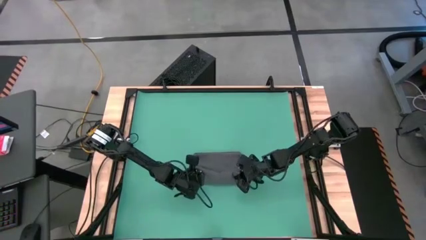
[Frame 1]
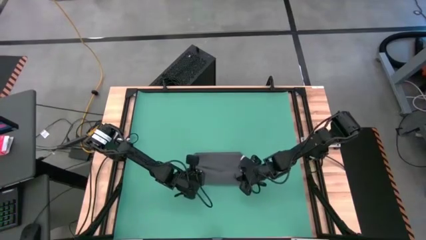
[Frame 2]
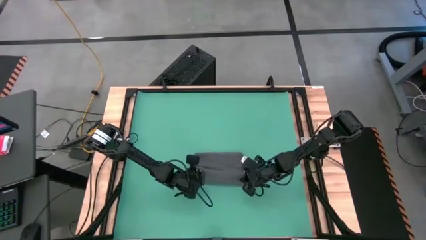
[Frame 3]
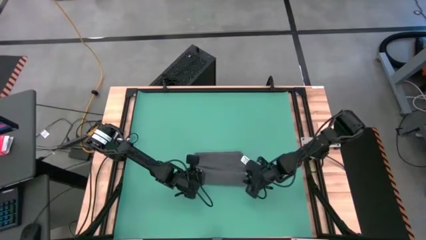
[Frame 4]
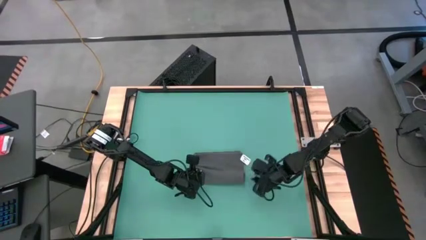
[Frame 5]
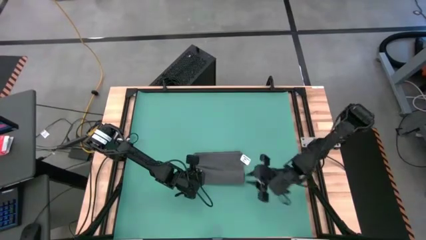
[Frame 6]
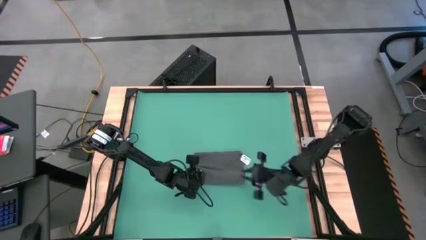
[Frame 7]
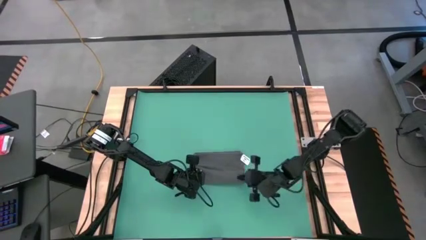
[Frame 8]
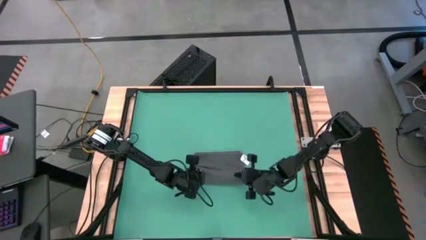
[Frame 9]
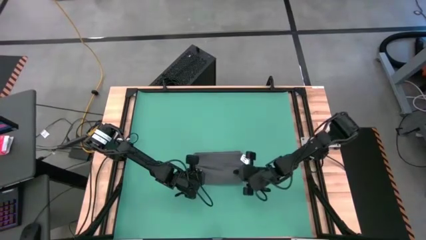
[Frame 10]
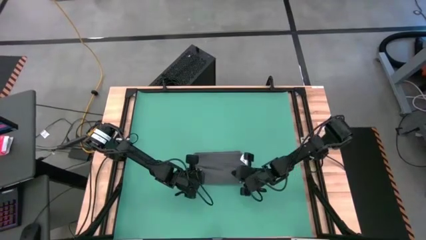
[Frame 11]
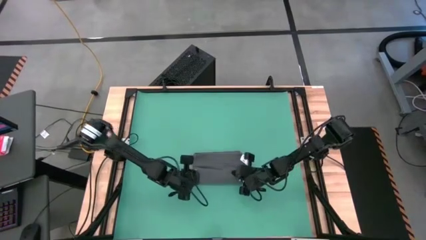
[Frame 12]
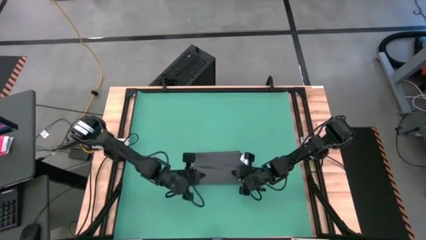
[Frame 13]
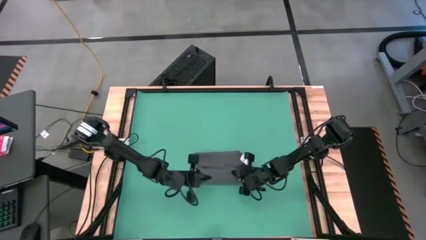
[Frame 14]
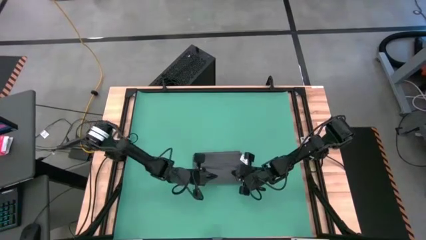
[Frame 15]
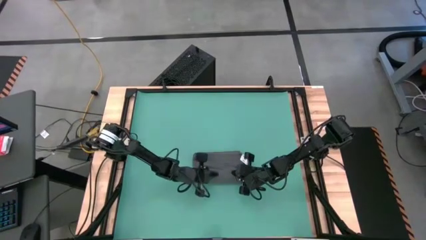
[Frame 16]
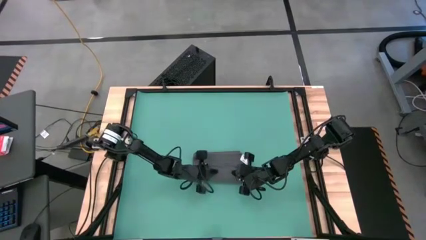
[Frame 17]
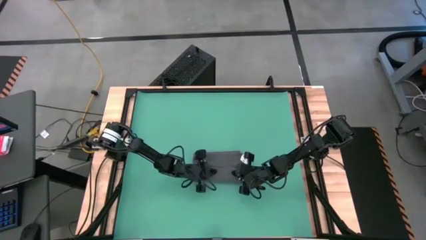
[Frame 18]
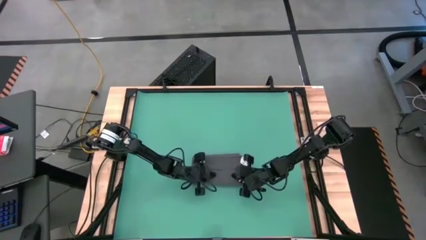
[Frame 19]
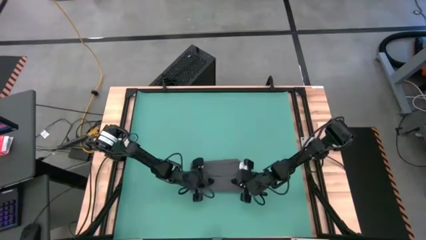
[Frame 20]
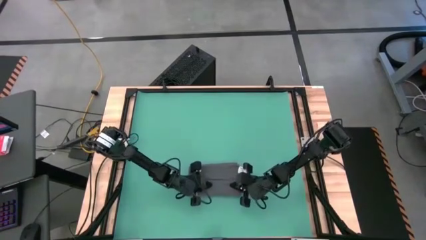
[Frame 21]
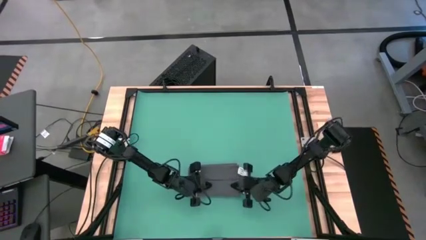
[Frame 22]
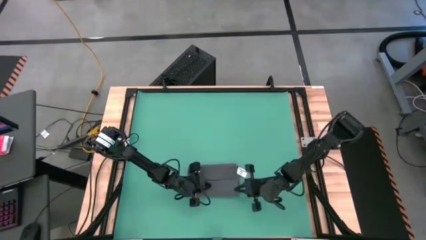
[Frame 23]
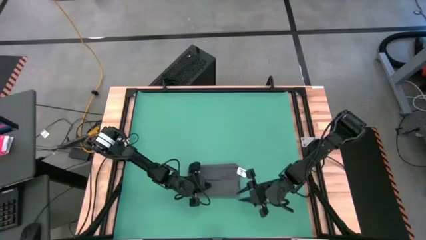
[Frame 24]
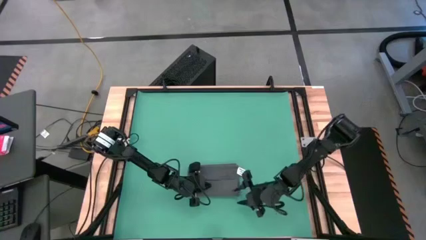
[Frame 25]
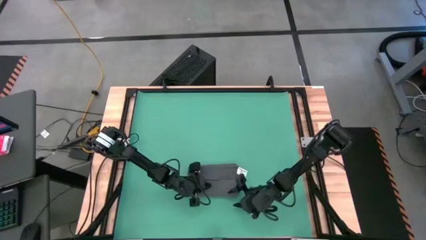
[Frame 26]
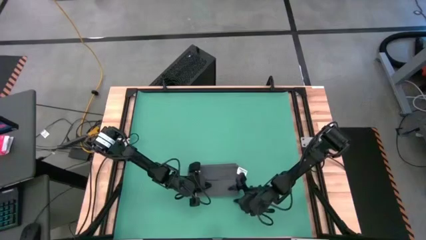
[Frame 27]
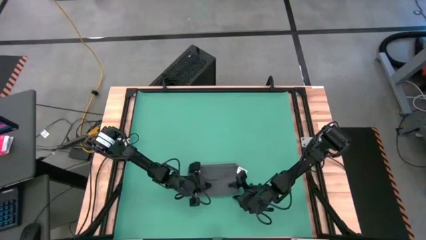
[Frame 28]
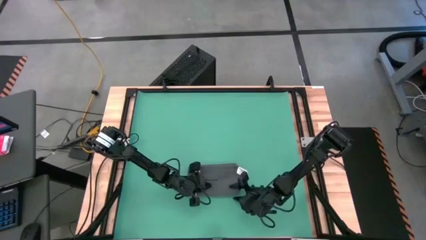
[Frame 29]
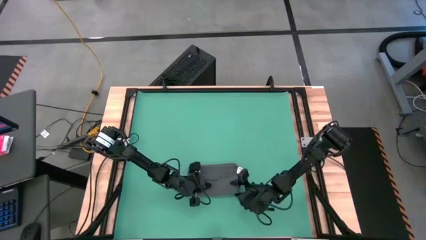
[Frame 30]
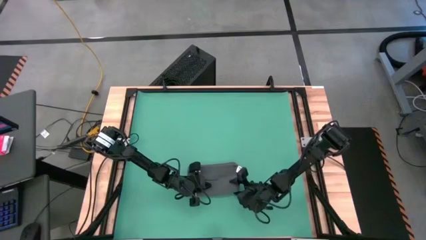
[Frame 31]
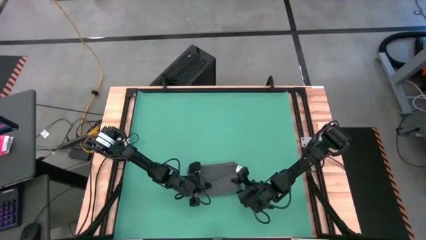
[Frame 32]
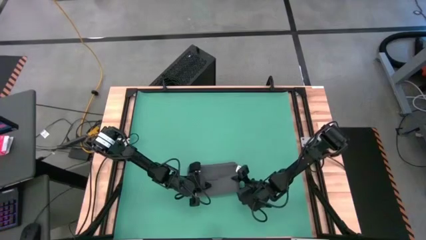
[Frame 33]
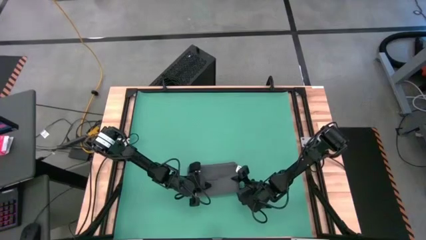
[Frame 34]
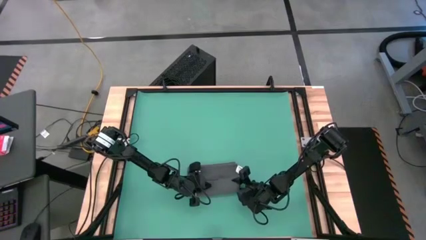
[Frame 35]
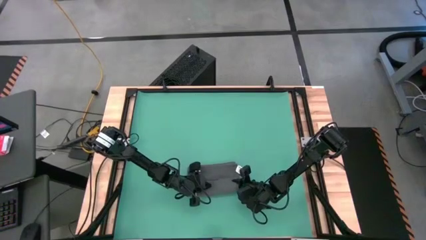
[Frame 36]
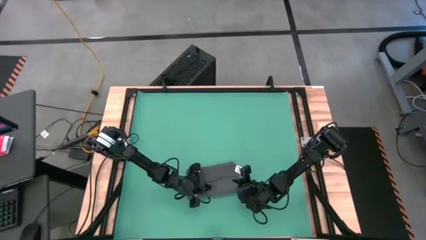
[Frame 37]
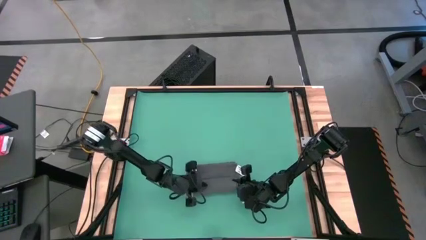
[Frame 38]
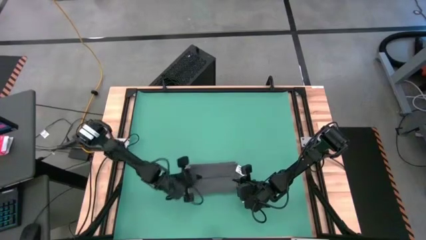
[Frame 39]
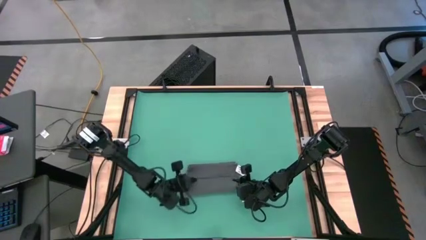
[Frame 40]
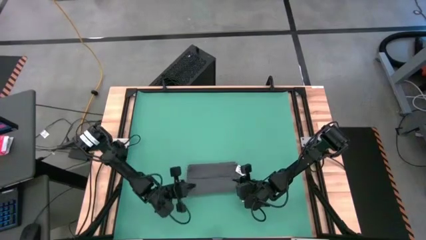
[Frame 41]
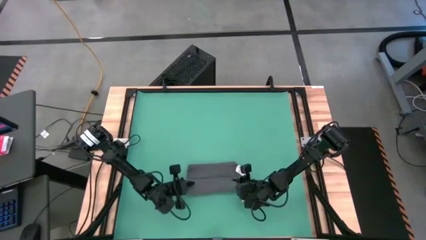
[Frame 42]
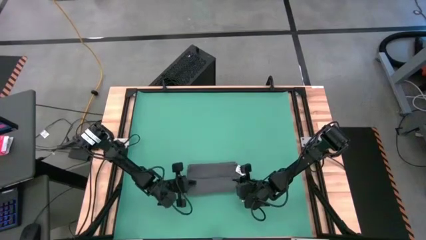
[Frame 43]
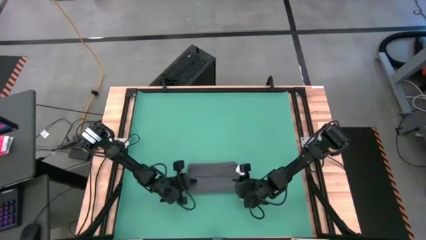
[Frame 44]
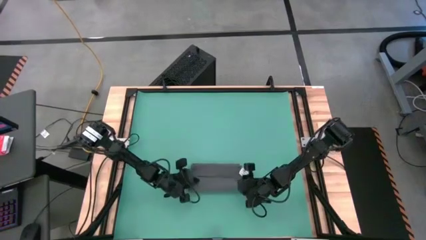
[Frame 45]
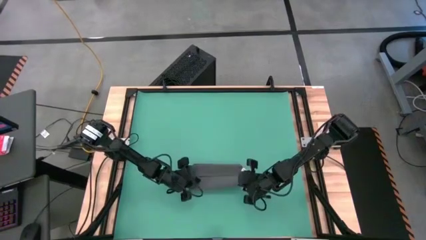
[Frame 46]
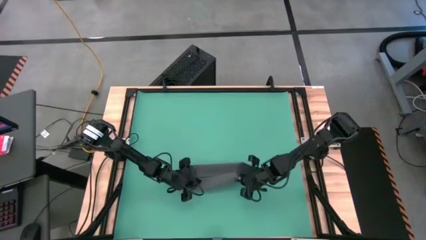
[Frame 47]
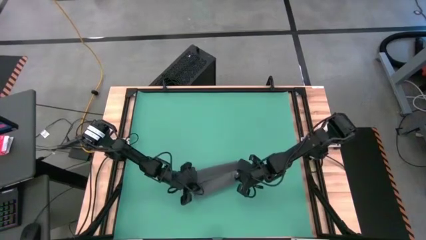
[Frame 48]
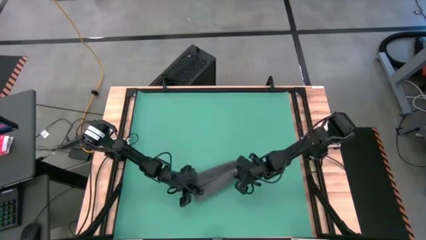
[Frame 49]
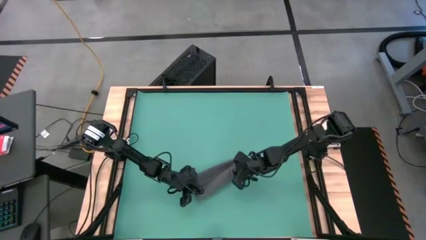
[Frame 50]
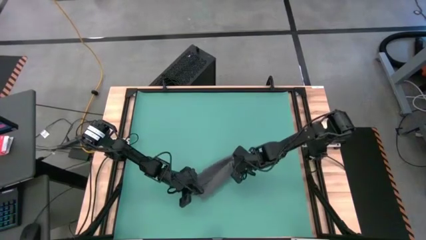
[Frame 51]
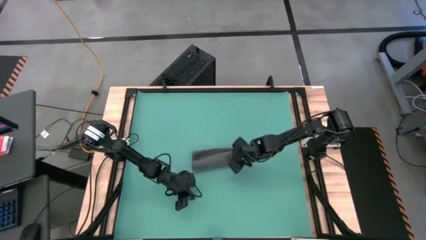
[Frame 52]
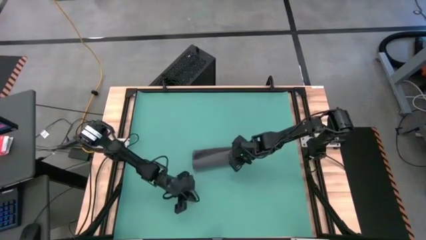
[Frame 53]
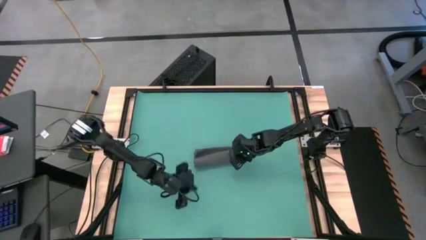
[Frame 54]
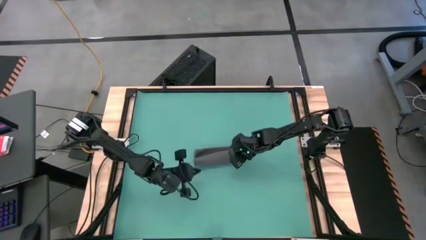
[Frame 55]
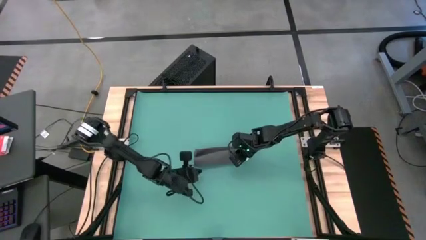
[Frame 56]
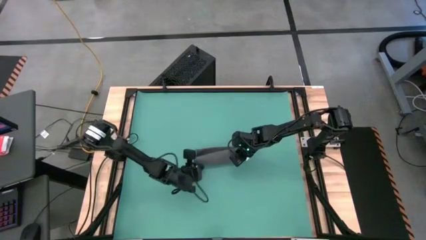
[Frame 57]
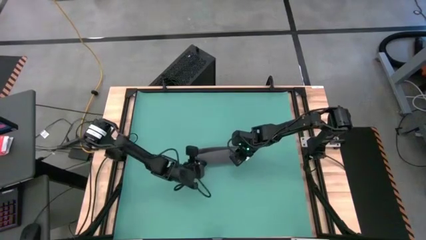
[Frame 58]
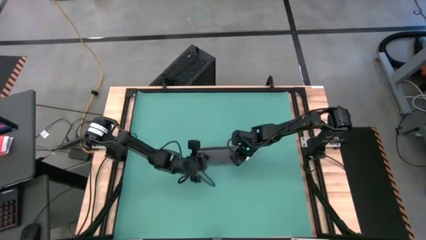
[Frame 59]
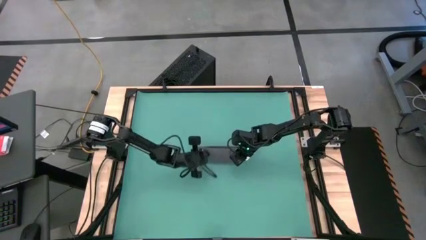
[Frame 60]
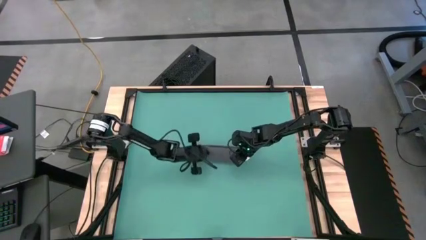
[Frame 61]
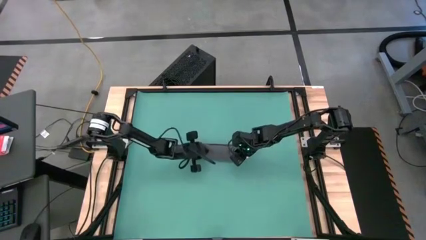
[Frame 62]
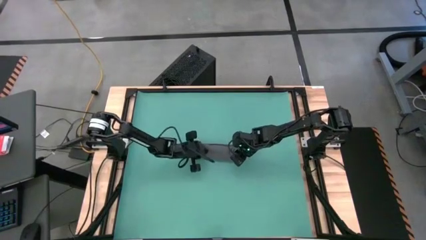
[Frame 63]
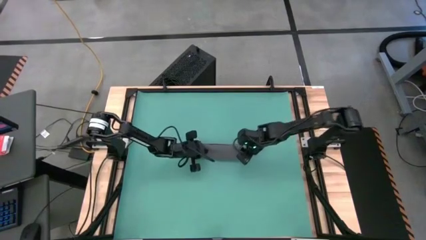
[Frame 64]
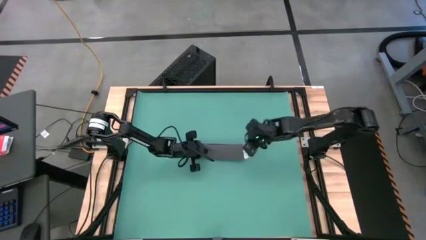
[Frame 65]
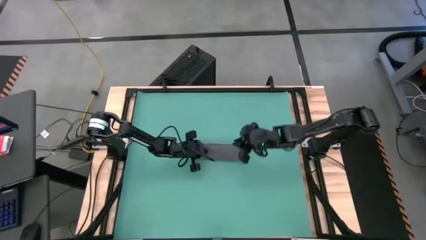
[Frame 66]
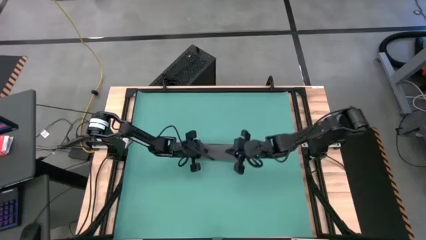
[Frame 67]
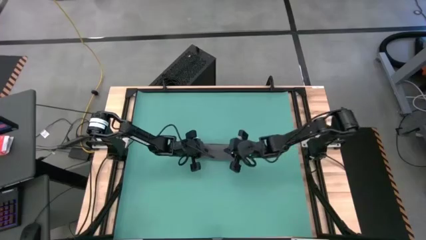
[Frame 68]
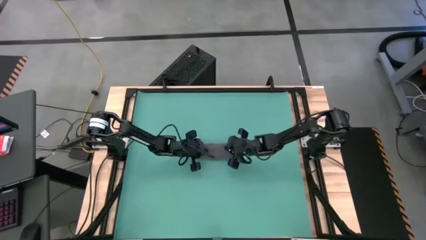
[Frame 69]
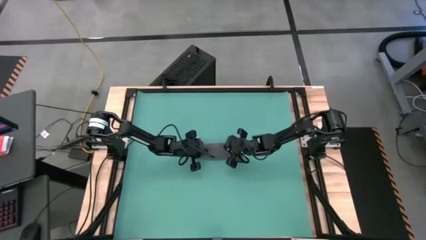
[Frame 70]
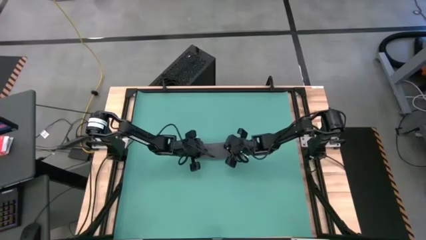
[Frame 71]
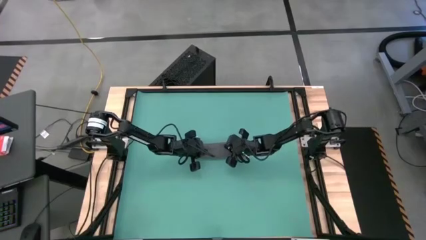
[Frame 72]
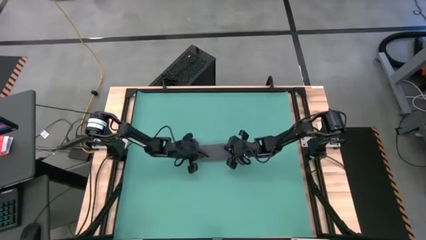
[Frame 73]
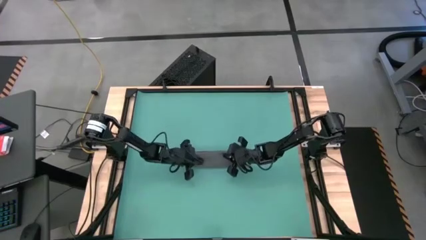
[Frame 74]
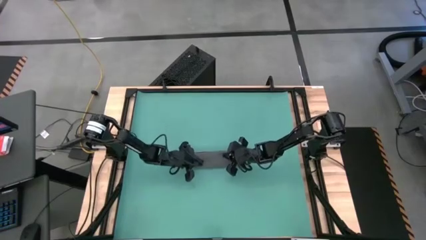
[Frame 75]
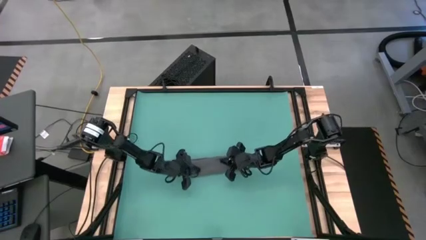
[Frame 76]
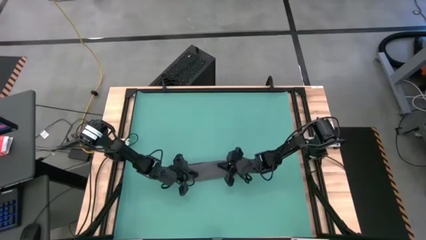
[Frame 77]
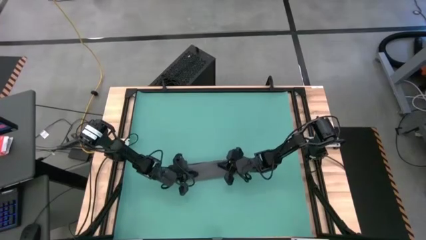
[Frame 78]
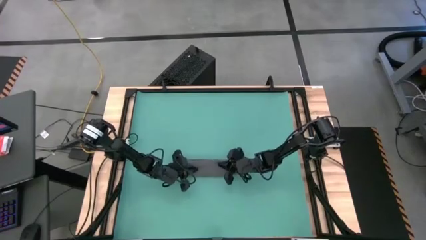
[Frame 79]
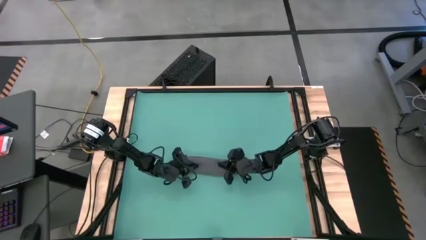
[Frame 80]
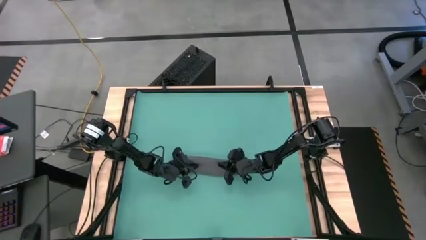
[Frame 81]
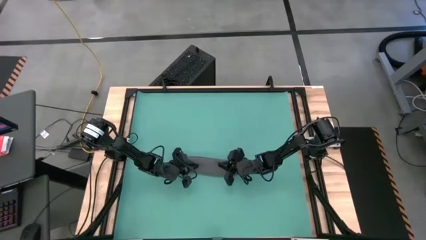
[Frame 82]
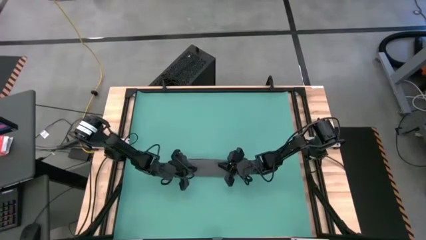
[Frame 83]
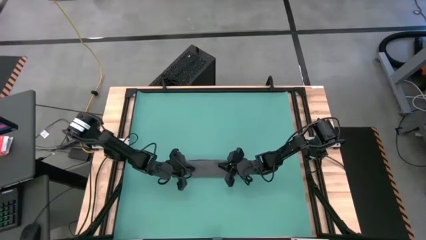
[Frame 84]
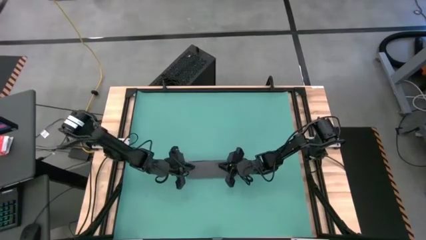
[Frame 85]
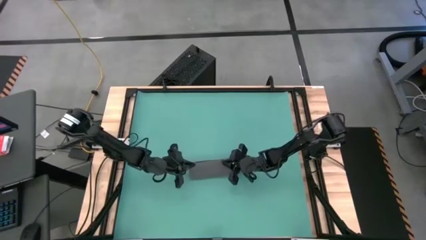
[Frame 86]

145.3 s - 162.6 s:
Task: Roll towel
Roll the gray towel
